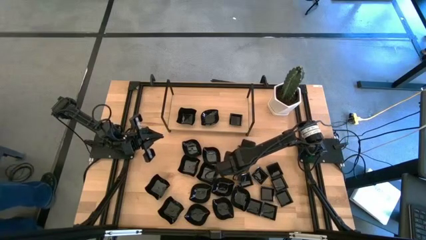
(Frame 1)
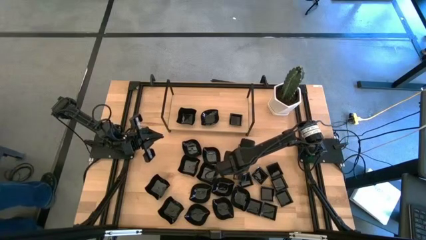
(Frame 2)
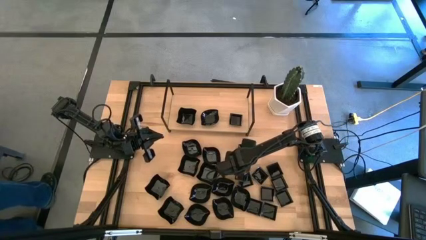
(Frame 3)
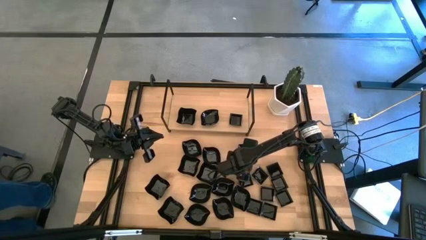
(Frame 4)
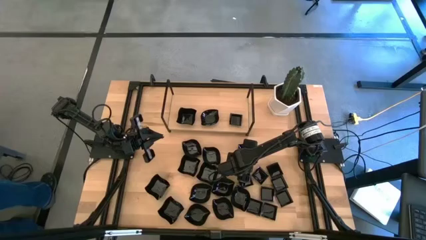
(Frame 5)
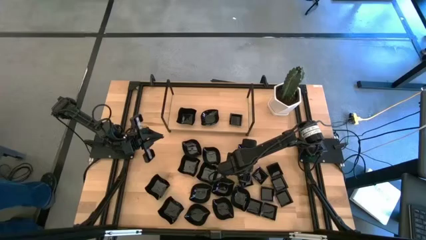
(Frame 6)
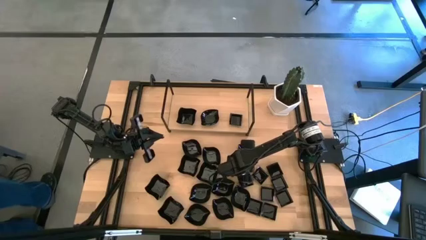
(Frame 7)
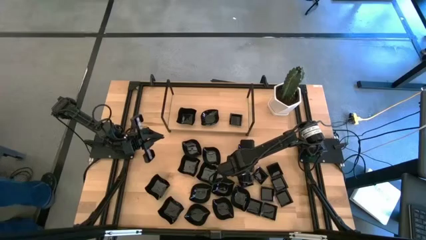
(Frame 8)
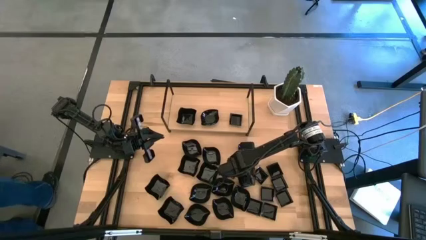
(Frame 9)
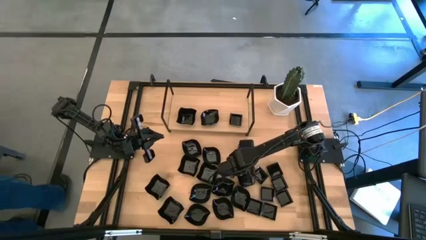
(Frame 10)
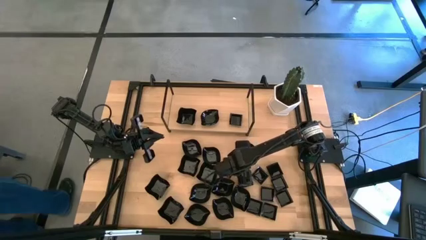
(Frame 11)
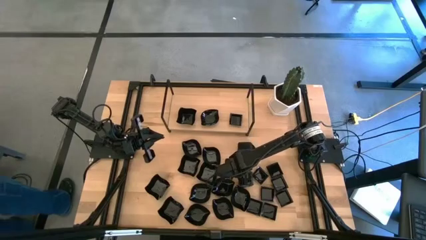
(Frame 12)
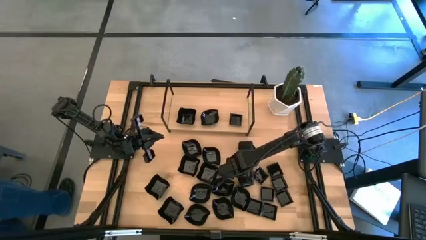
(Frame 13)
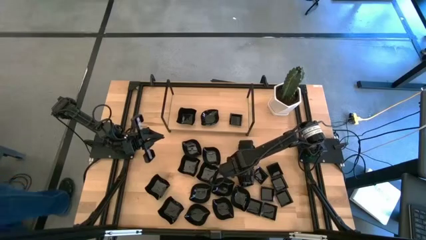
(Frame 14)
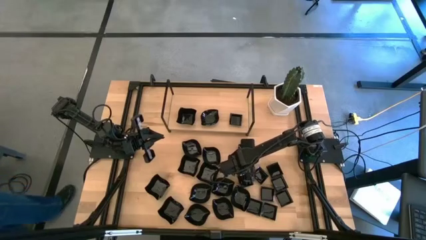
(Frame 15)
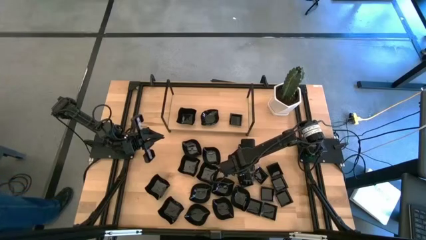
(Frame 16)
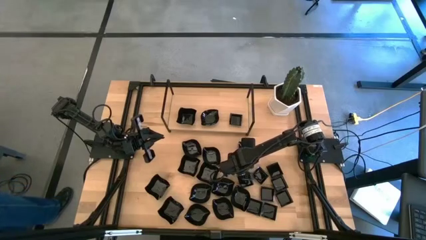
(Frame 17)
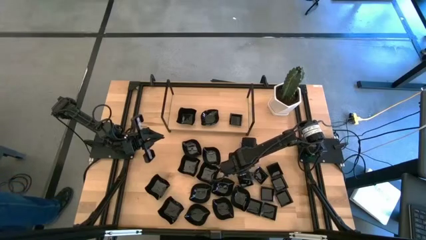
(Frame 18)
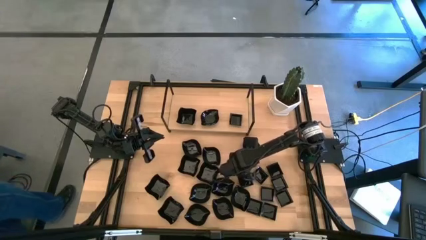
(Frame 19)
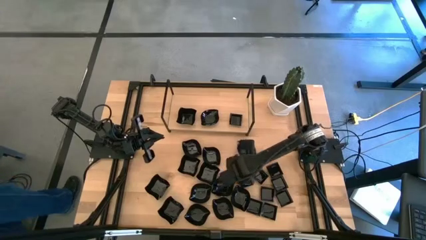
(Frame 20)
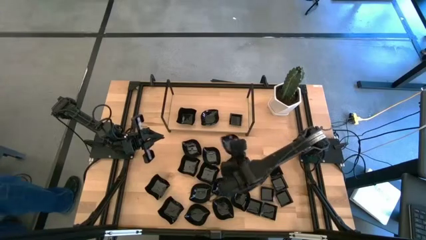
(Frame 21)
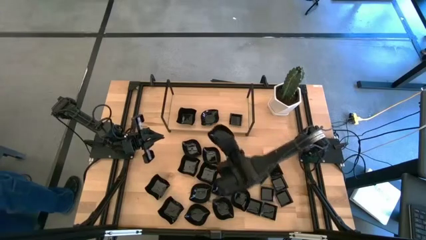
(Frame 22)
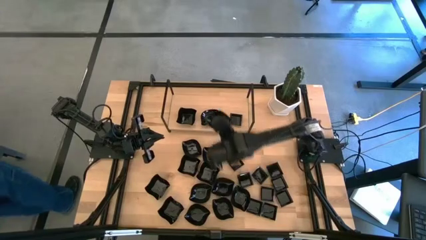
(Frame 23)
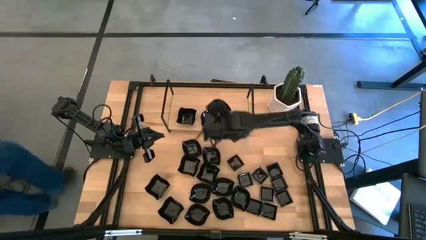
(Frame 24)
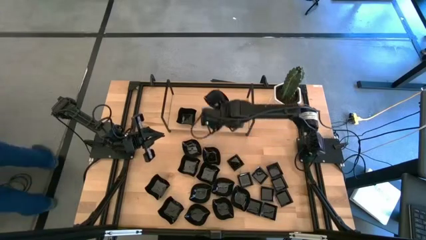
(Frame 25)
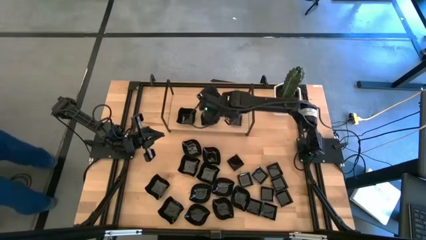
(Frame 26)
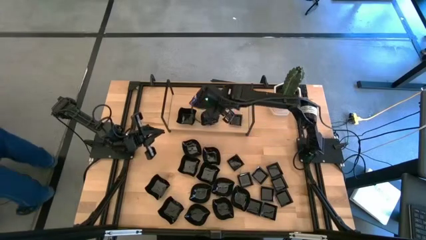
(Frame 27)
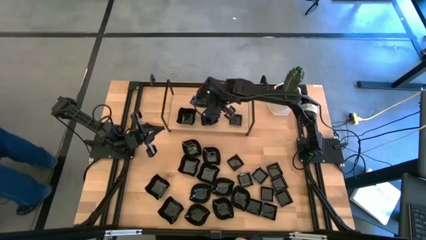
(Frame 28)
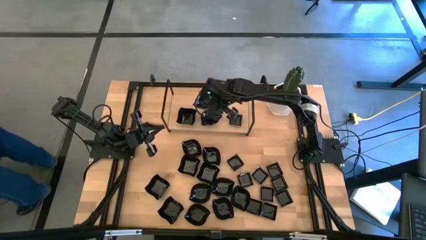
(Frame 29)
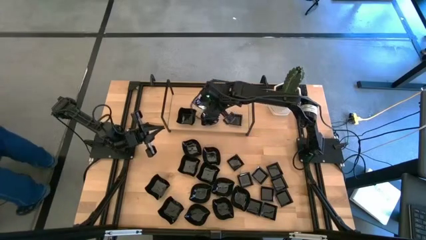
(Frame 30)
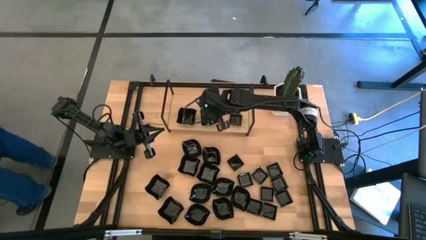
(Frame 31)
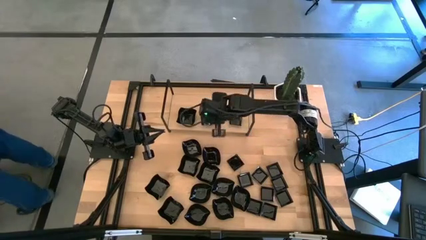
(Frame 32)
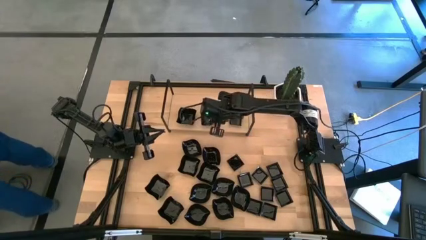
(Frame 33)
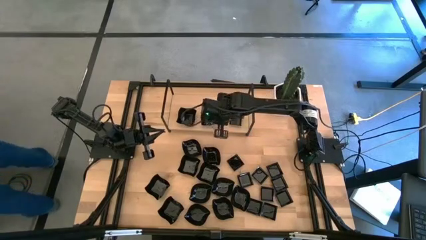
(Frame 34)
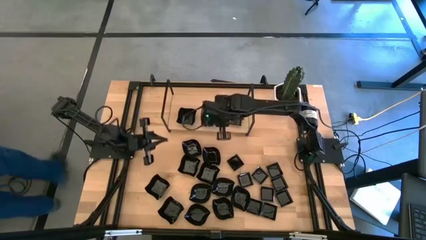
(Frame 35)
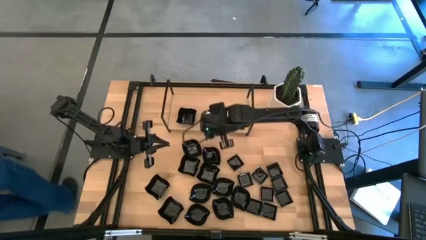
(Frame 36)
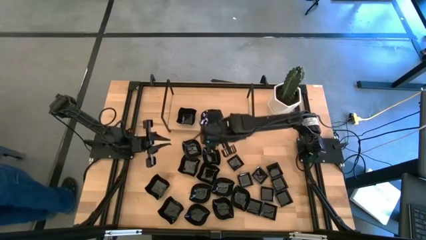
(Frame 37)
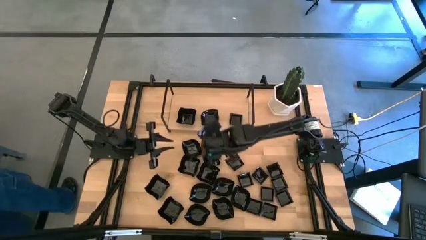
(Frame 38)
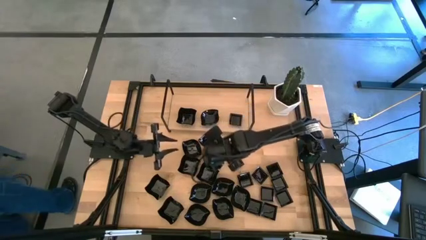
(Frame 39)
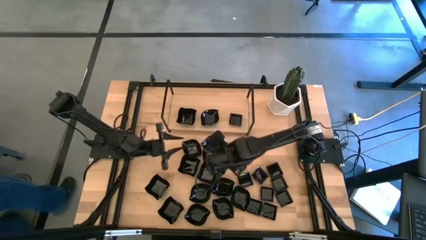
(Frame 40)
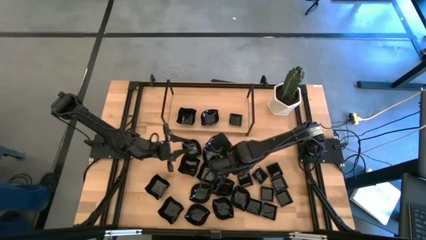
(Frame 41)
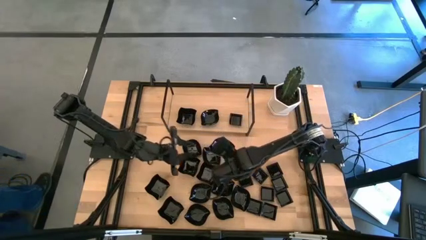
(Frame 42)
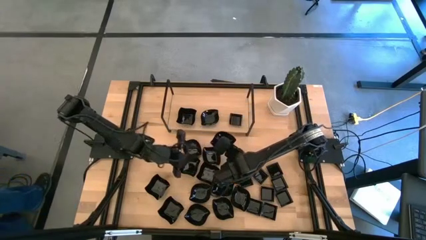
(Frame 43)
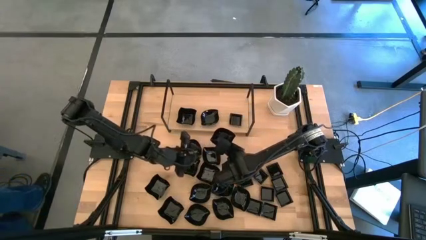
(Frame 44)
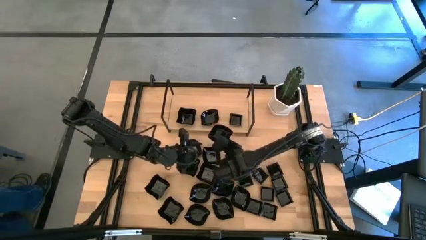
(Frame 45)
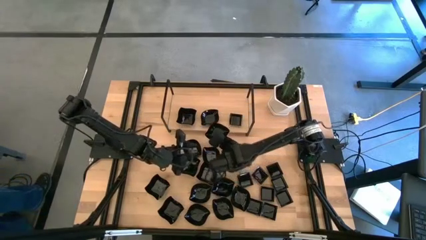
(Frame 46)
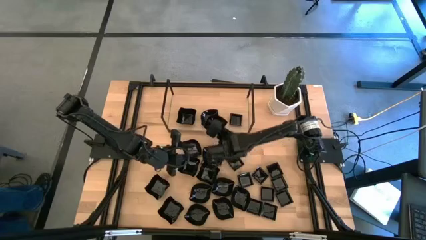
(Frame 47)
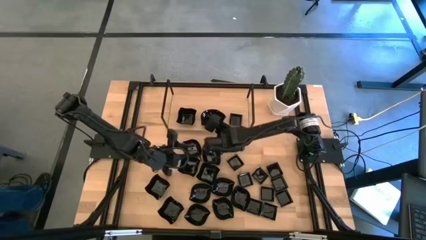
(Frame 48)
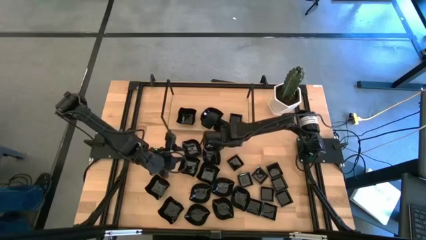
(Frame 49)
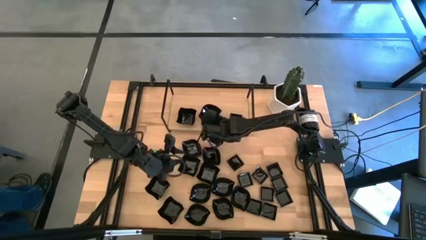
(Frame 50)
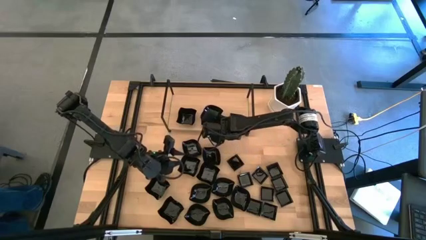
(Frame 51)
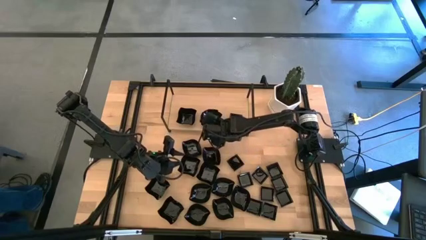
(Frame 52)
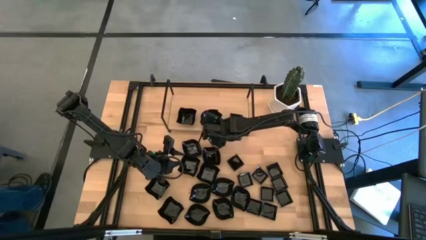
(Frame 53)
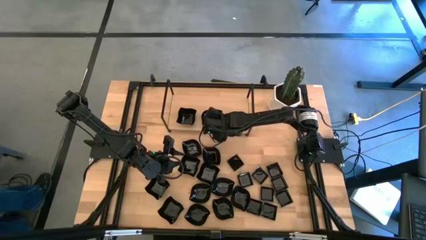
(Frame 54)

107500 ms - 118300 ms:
Task: Pick & Place Mini shaped plates
Stack the leaf-shaped plate on the top of the leaf-shaped plate on the shelf

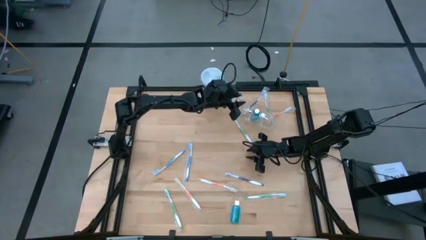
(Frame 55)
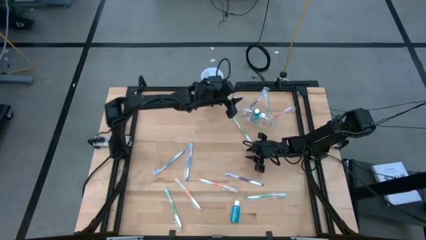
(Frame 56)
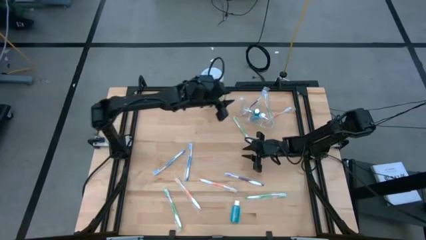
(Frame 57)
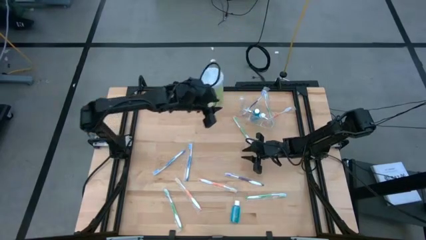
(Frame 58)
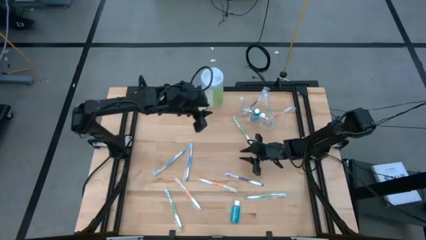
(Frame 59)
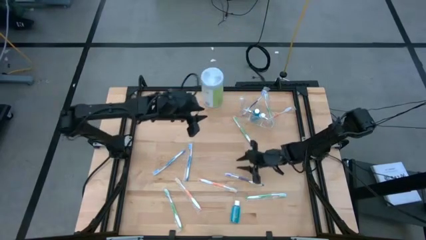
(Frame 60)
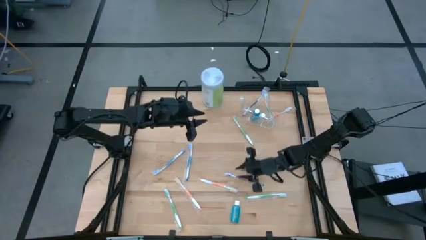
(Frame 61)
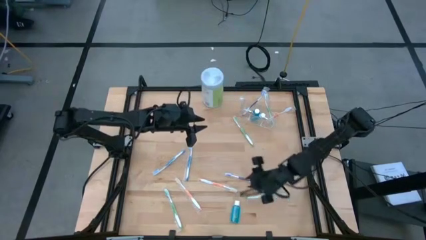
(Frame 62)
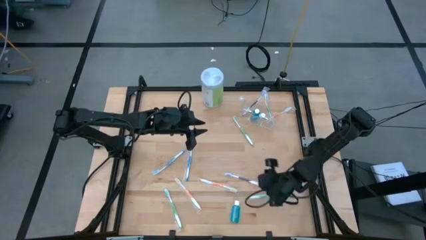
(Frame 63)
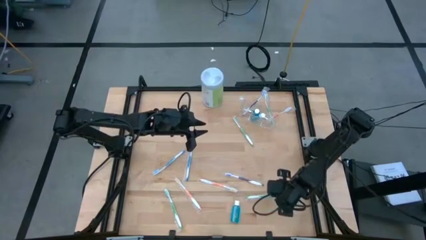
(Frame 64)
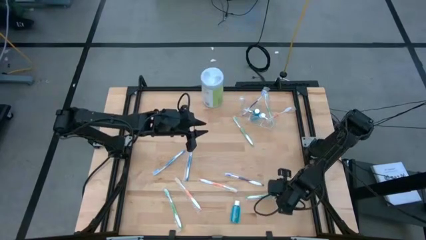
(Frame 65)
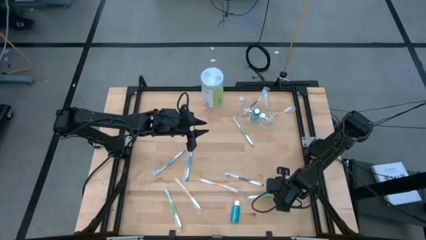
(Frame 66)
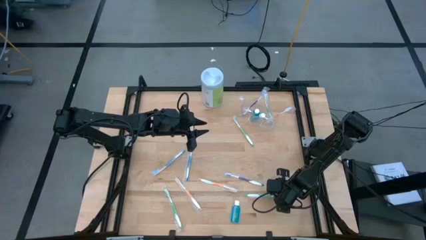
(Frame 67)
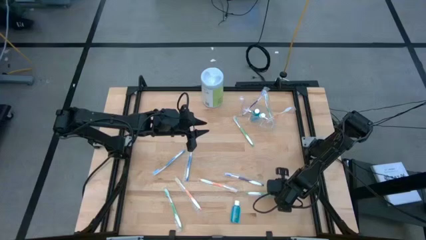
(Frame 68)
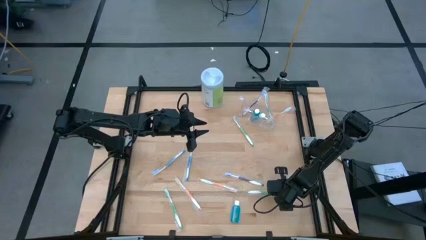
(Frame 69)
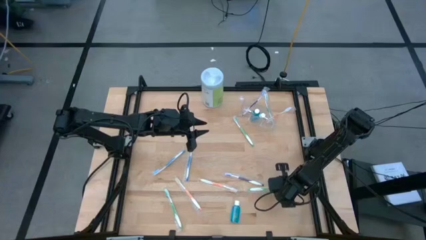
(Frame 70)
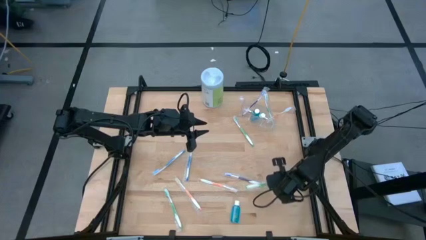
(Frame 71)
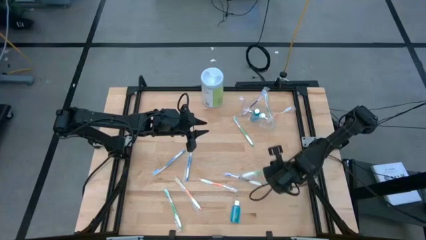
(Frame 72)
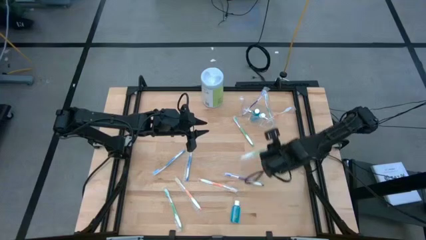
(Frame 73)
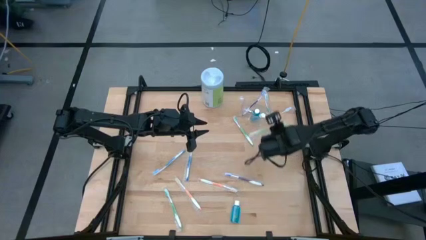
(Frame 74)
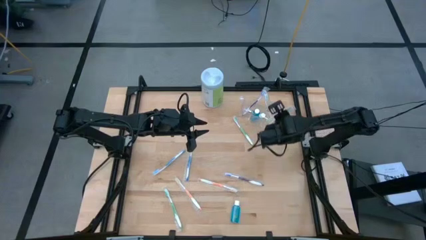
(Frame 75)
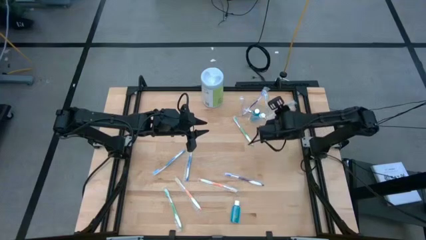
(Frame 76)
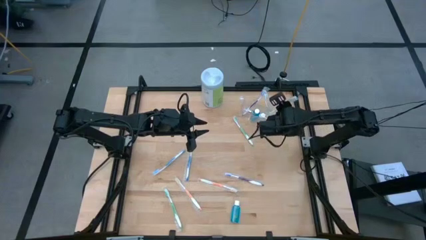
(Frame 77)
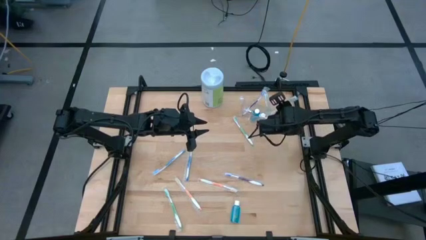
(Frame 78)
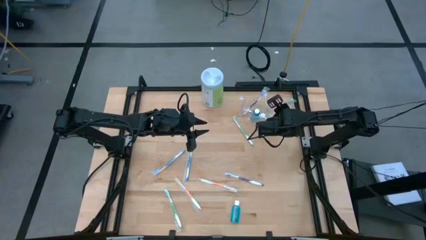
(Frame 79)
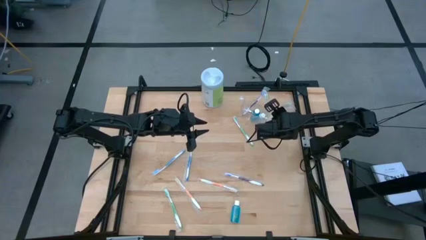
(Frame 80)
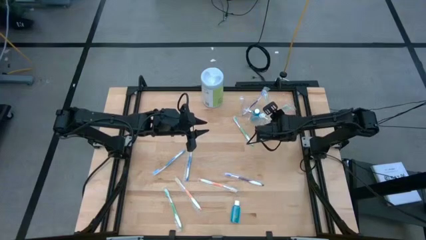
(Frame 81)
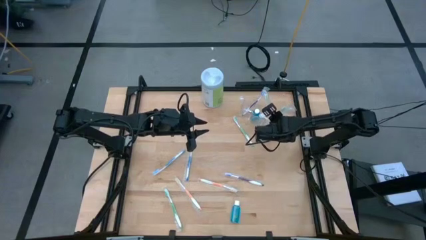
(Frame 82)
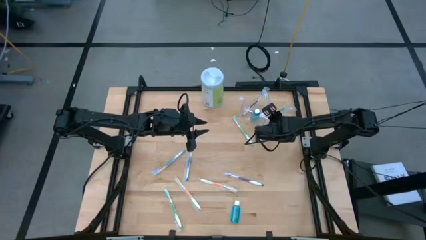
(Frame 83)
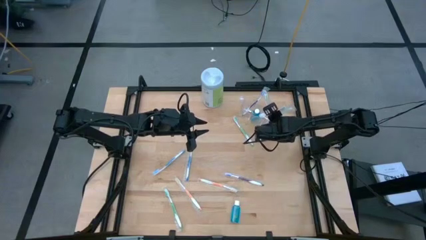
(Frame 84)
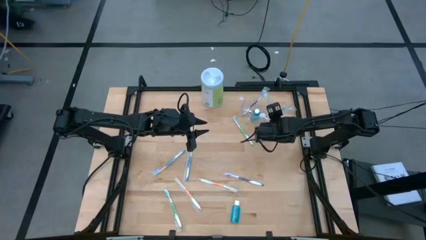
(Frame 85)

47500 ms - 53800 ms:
Task: Pick & Place toothbrushing station
Put the green toothbrush into the transparent organizer
